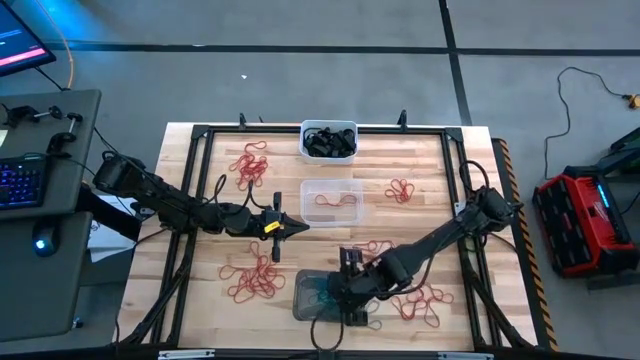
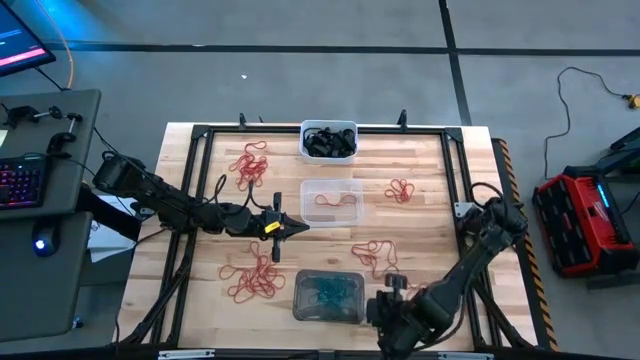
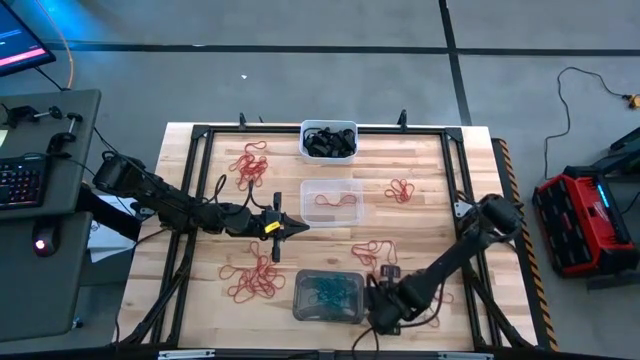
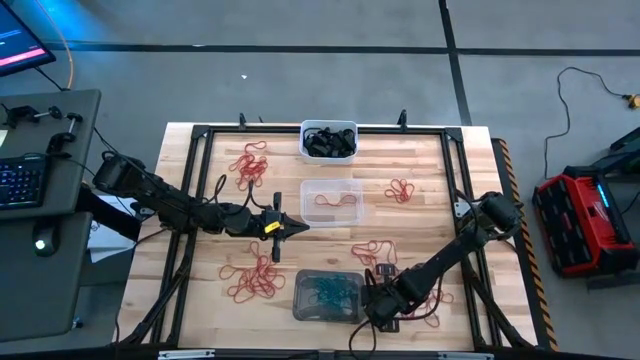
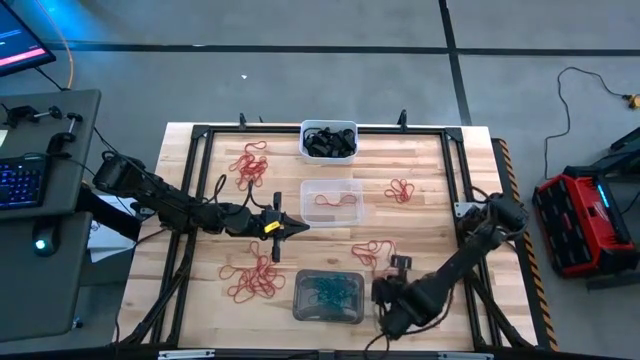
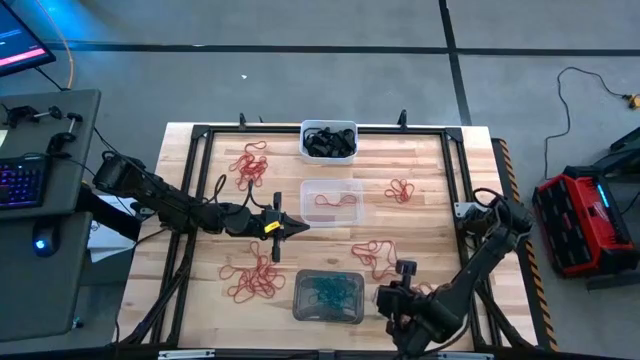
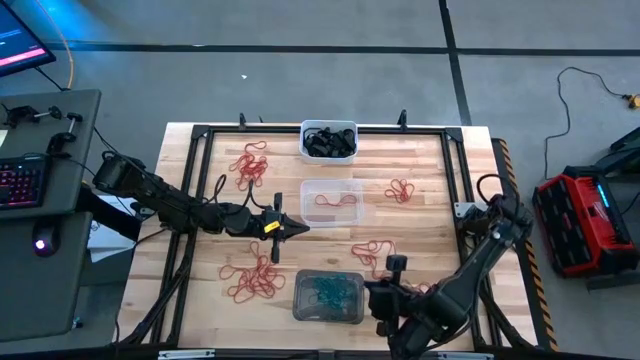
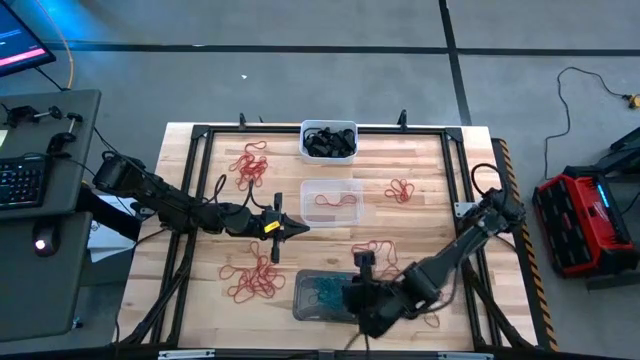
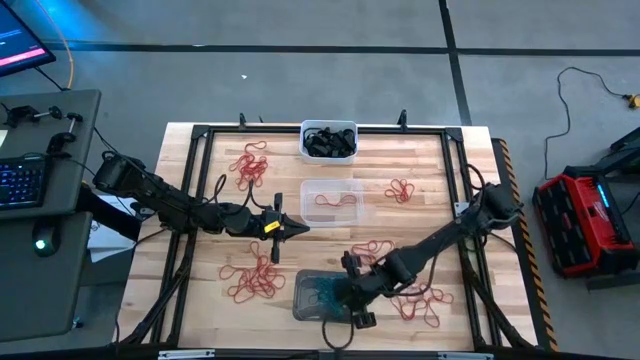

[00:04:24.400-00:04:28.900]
Task: Sort rubber bands into baskets
Put the blue rubber band into the black bin

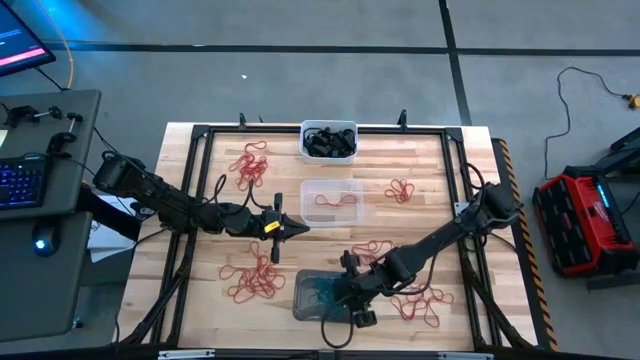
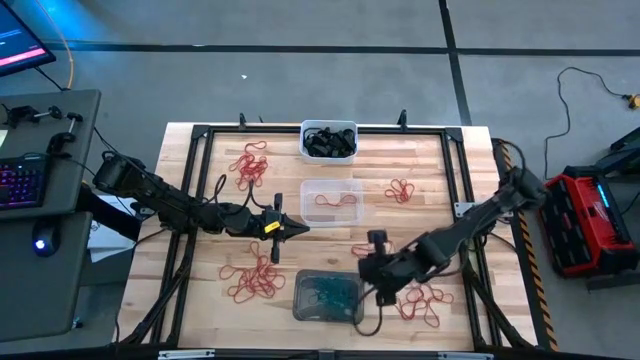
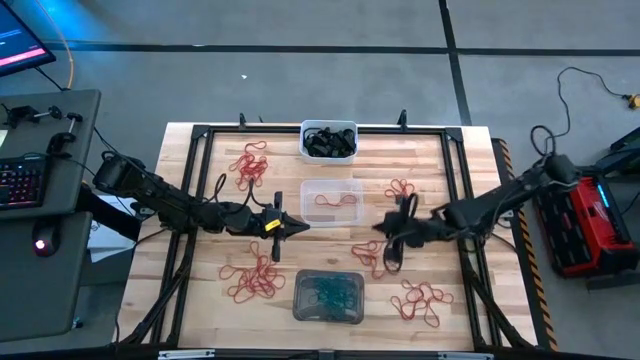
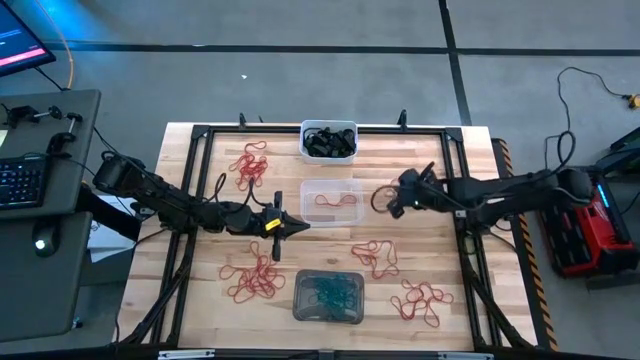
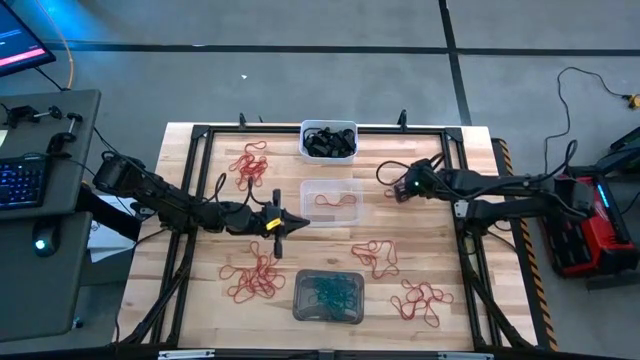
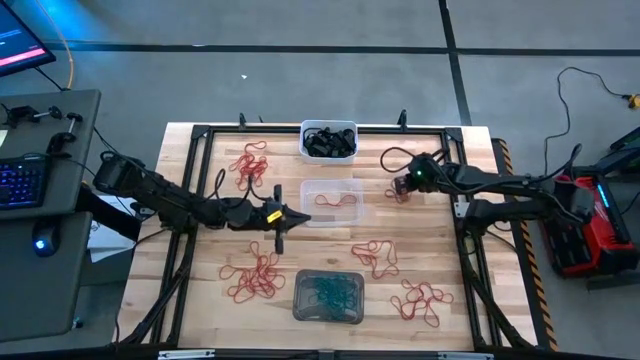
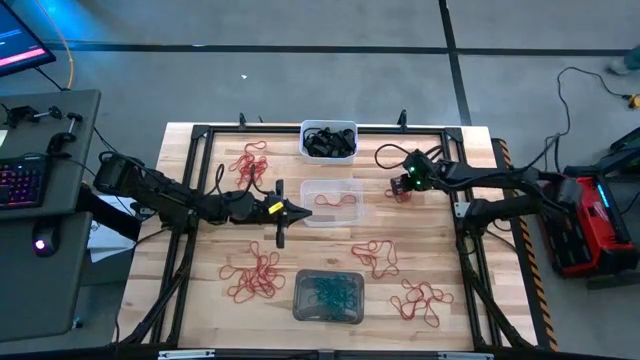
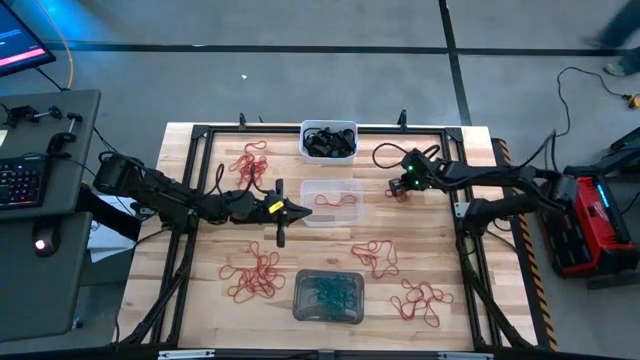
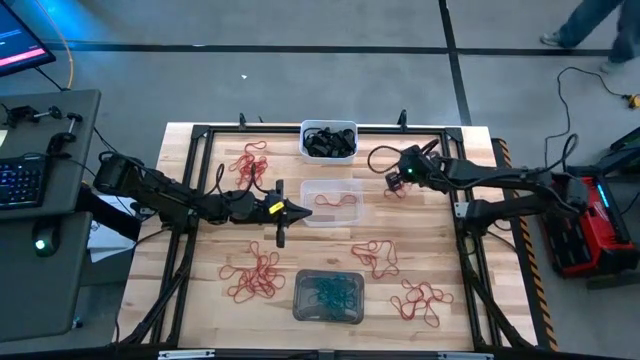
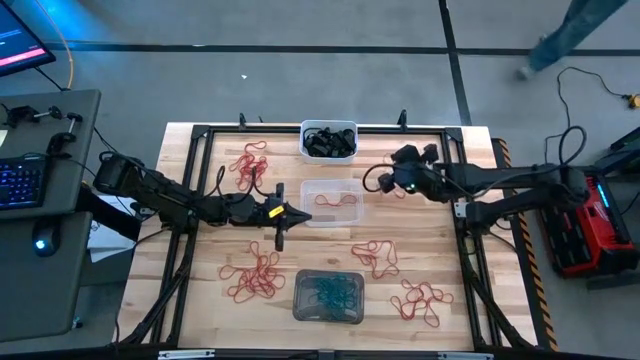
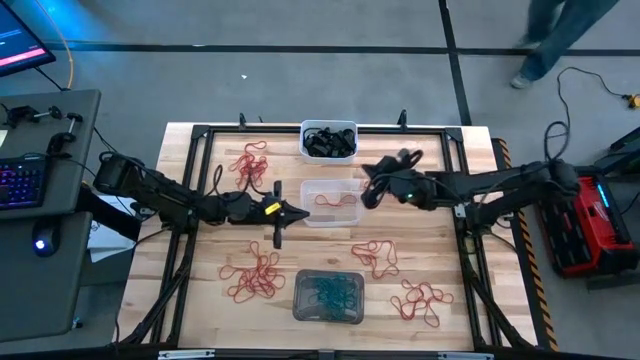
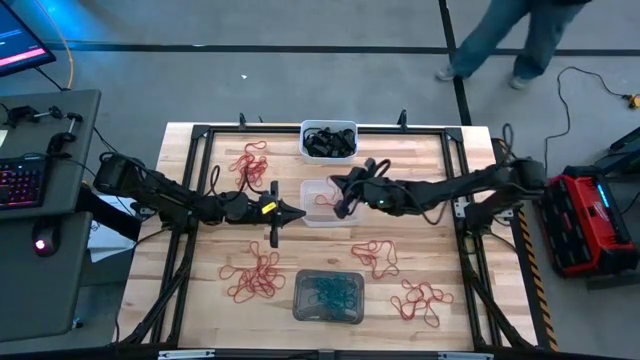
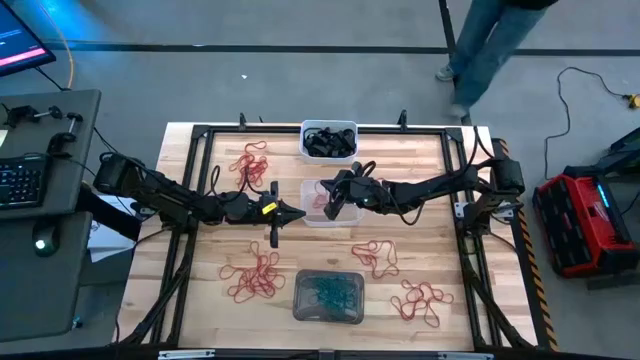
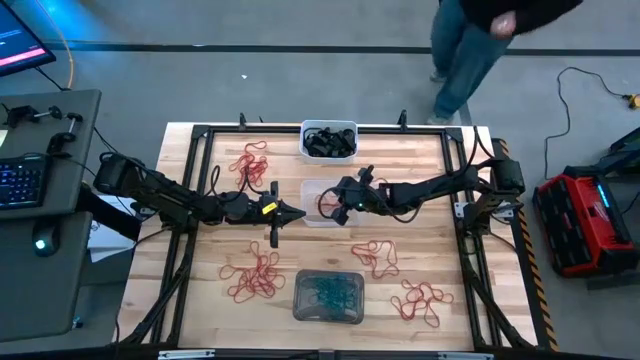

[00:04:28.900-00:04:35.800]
Put the red rubber band into the transparent bin

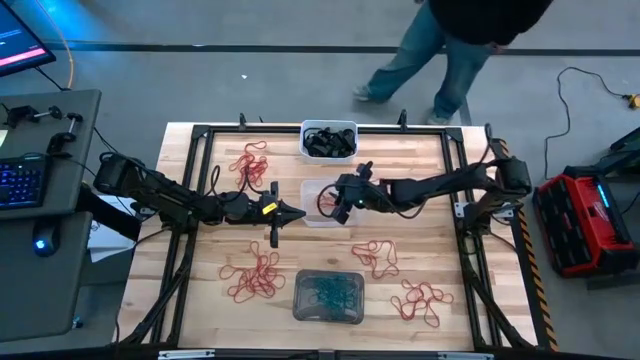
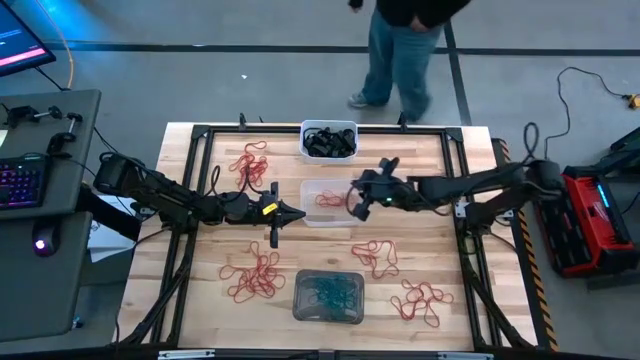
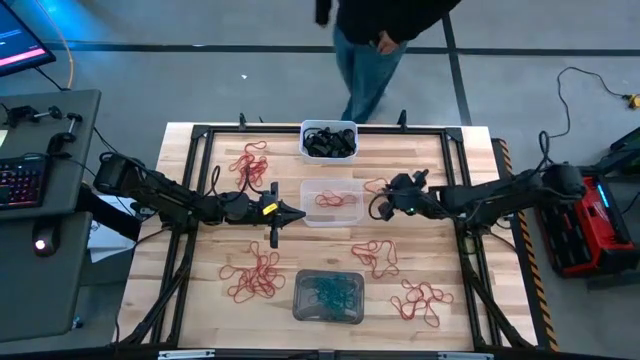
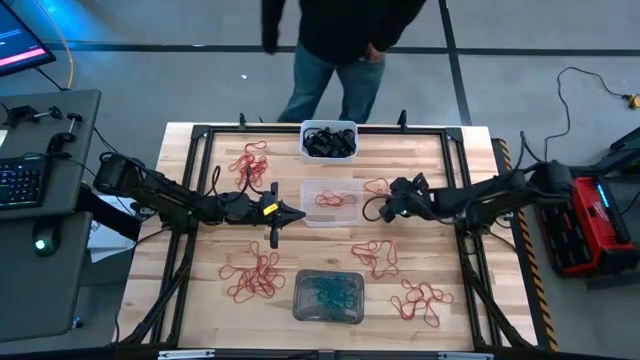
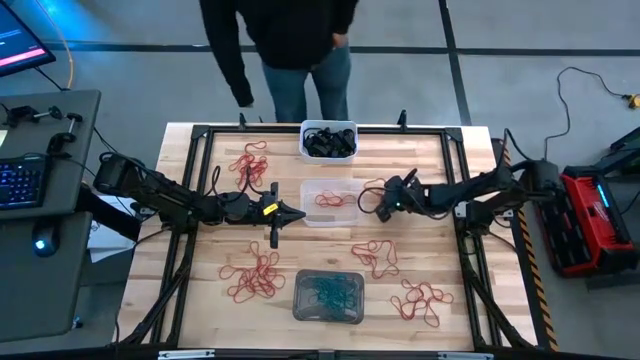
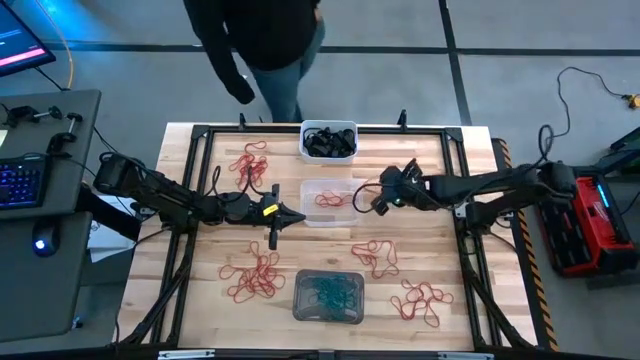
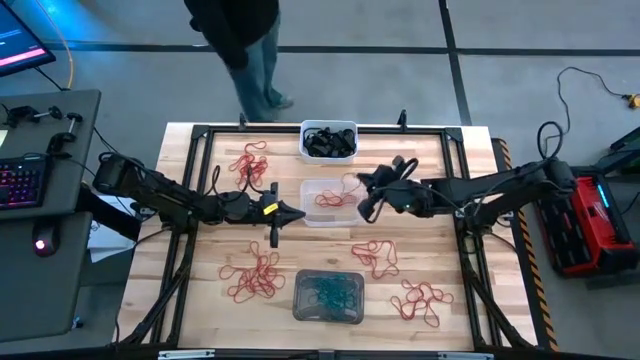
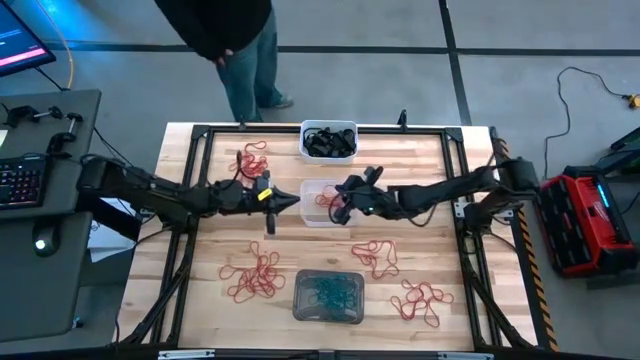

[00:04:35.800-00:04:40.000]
Put the red rubber band into the transparent bin

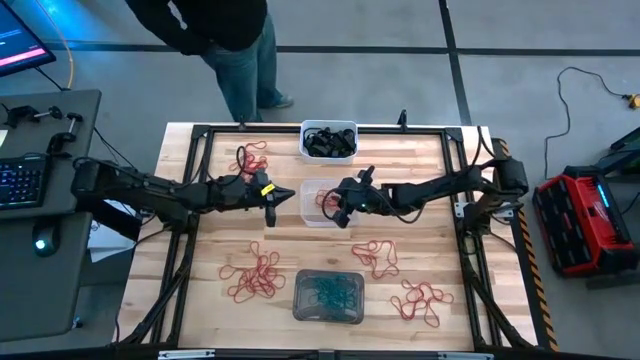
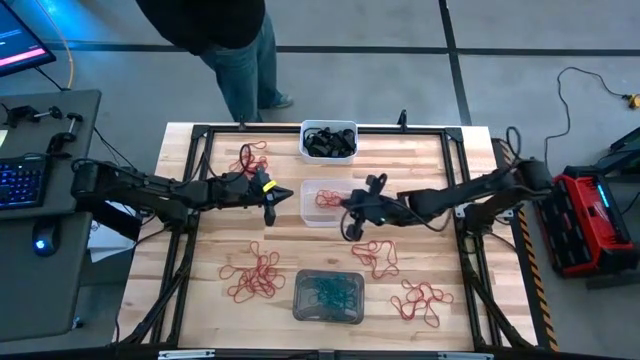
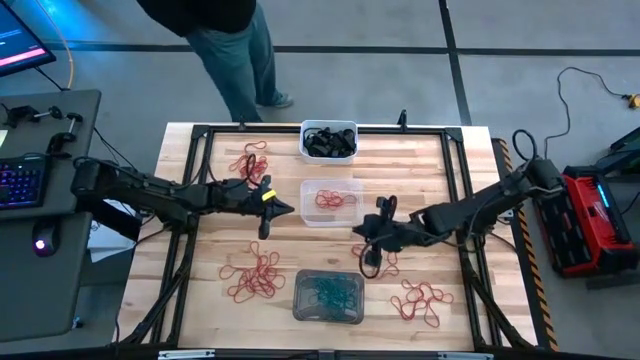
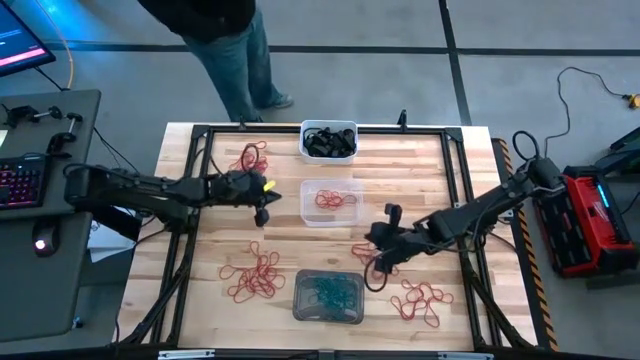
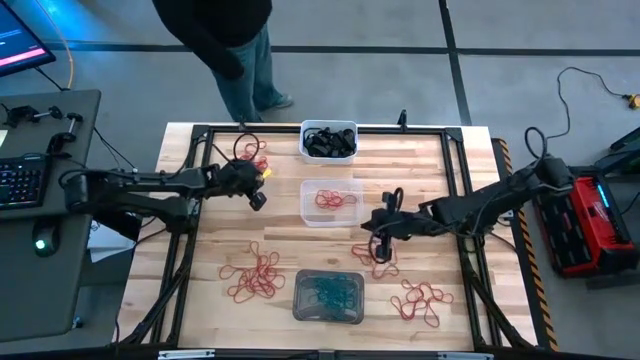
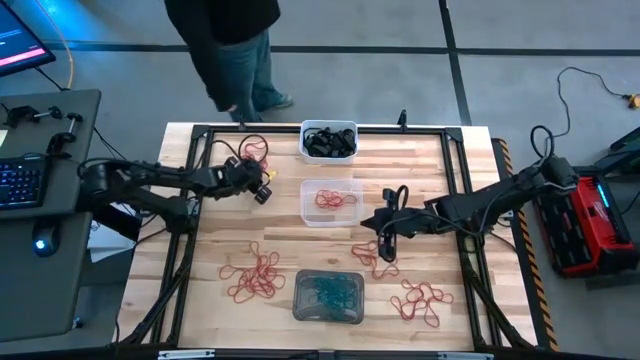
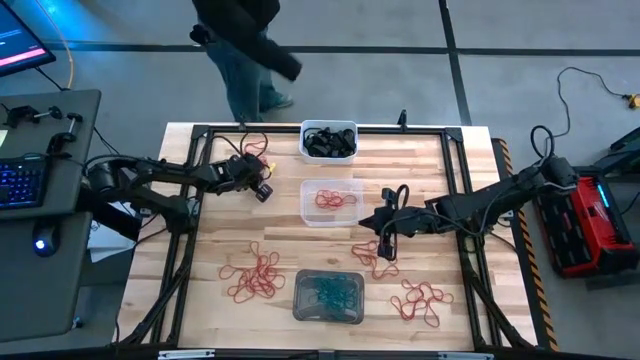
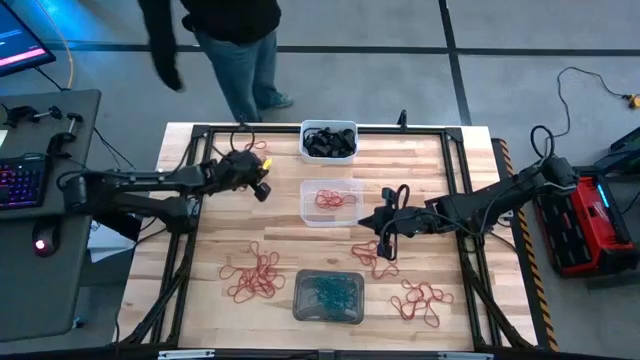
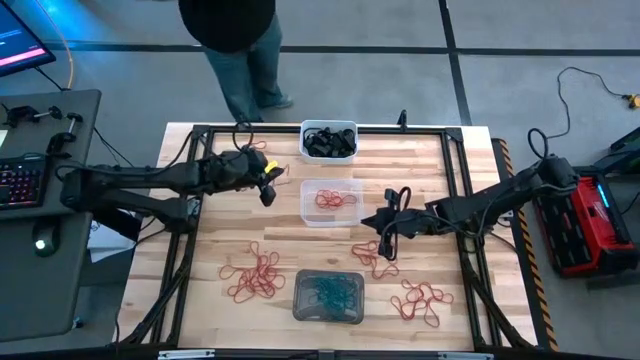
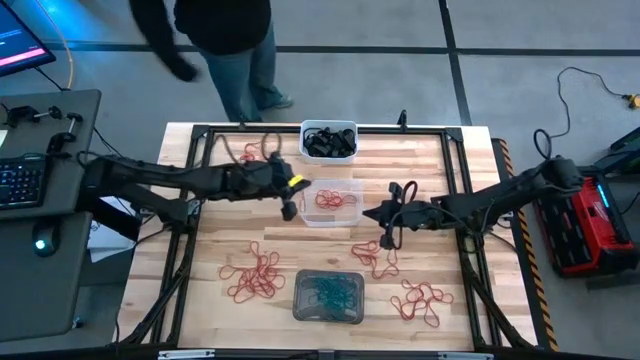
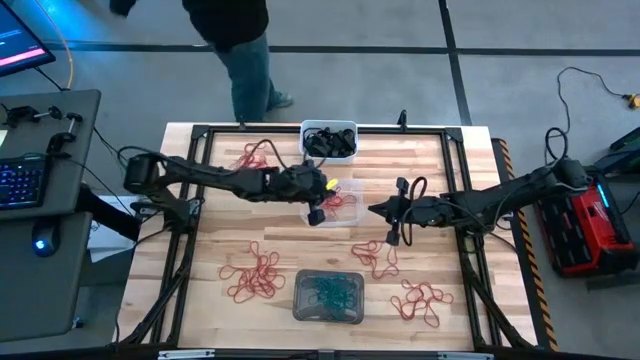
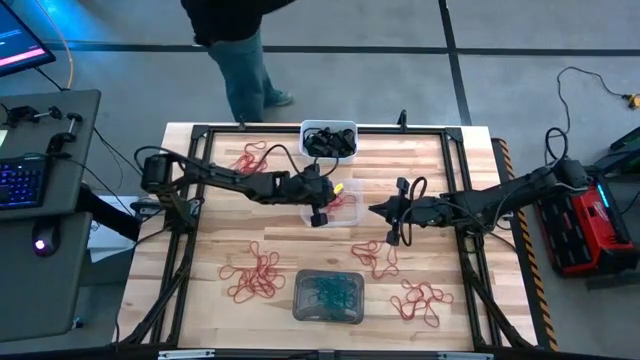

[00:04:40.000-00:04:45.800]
Put the red rubber band into the transparent bin
